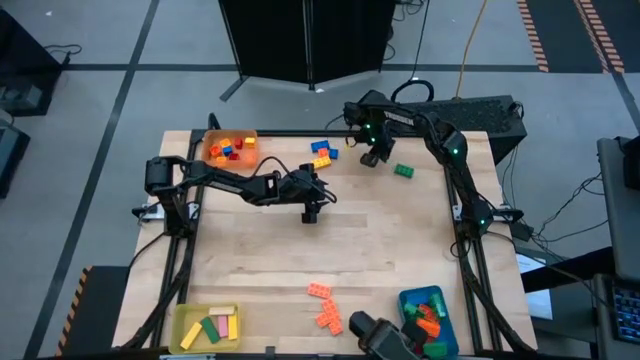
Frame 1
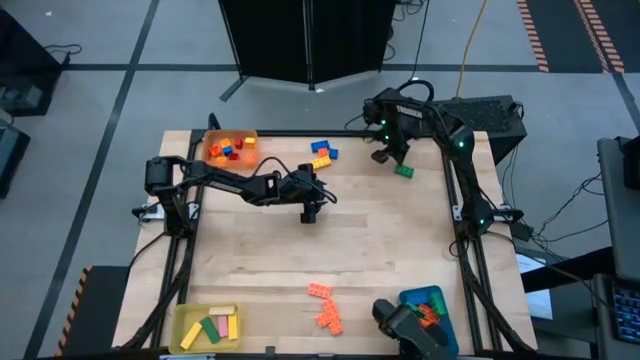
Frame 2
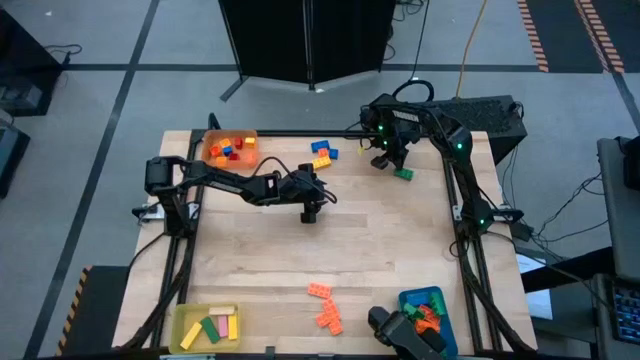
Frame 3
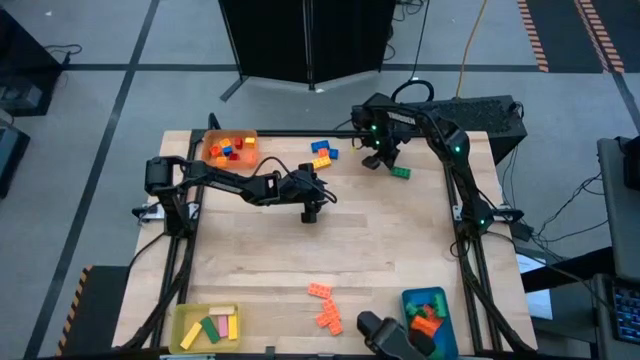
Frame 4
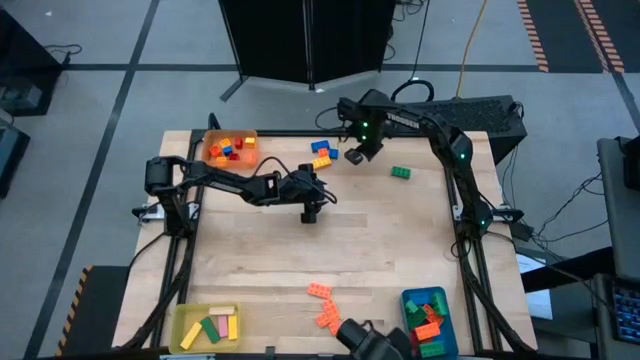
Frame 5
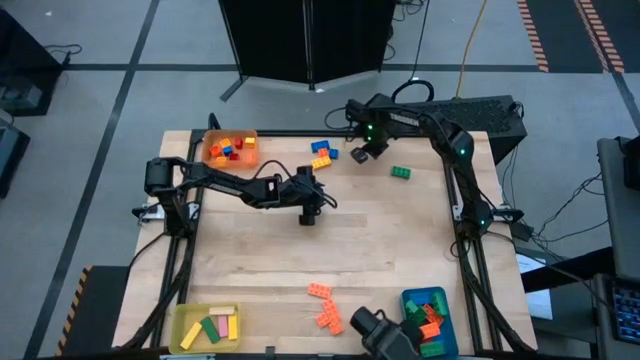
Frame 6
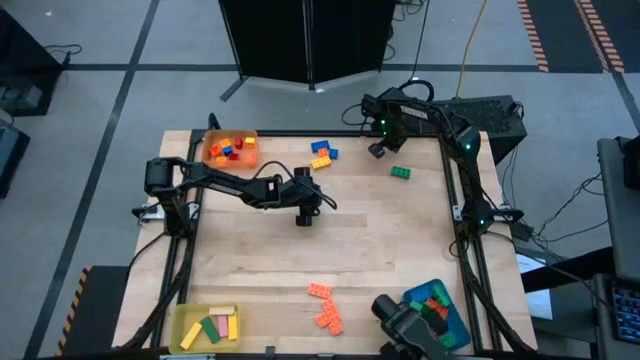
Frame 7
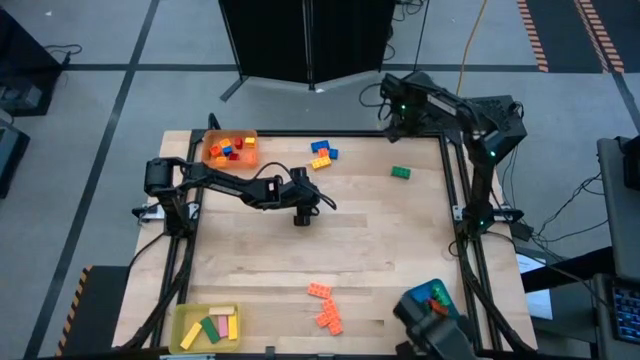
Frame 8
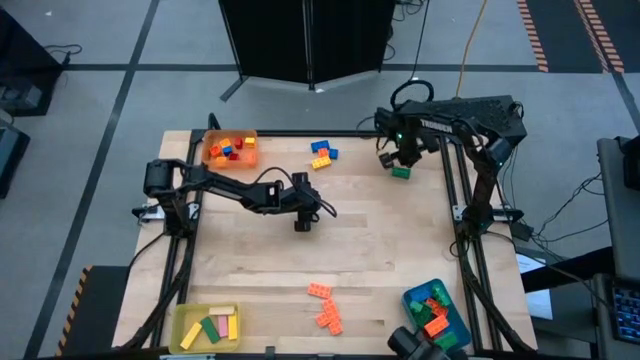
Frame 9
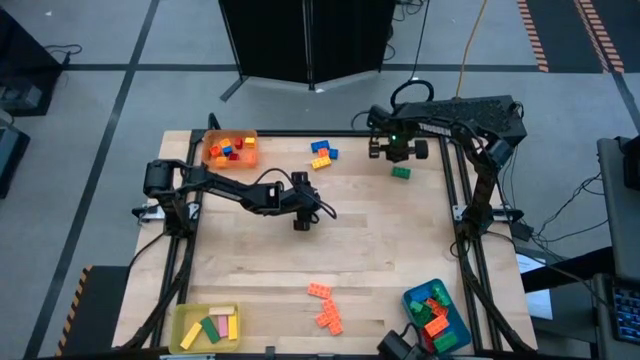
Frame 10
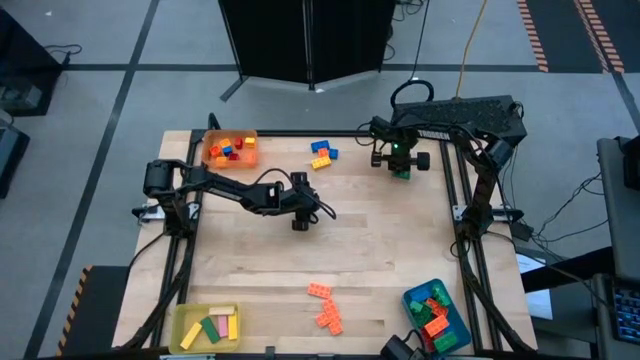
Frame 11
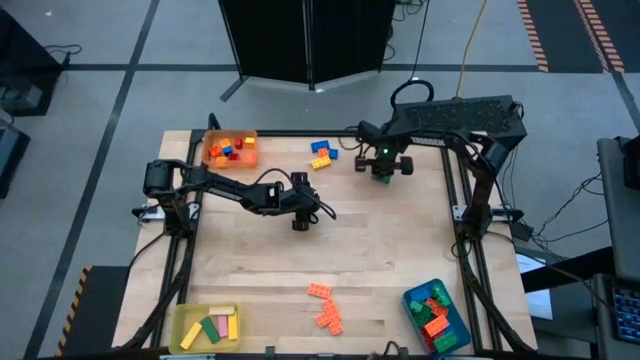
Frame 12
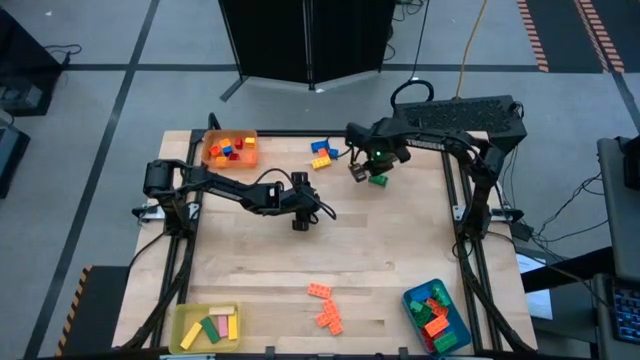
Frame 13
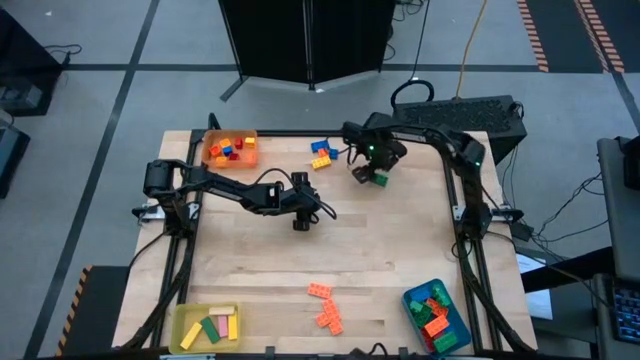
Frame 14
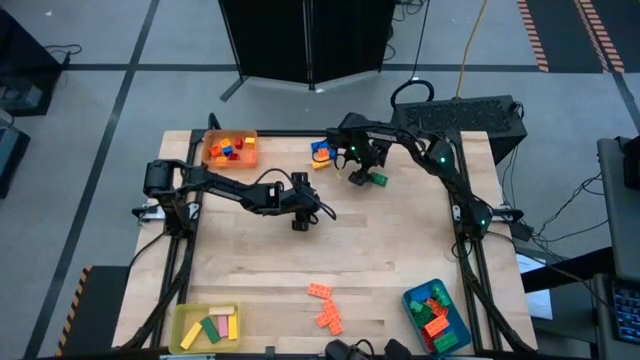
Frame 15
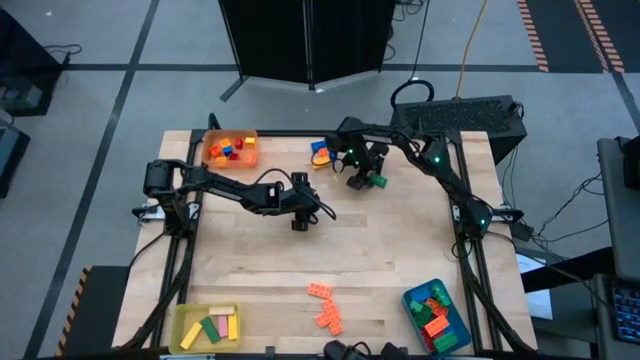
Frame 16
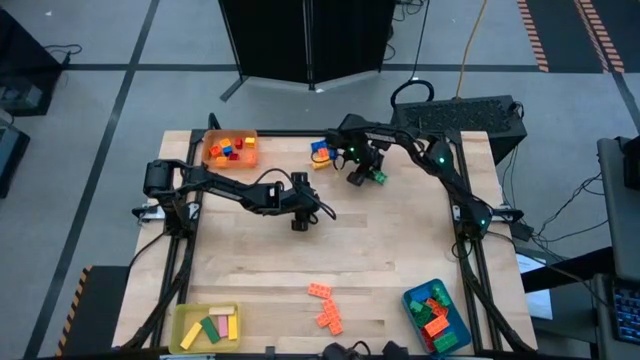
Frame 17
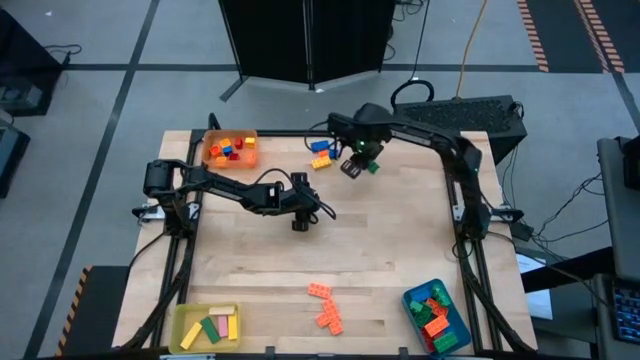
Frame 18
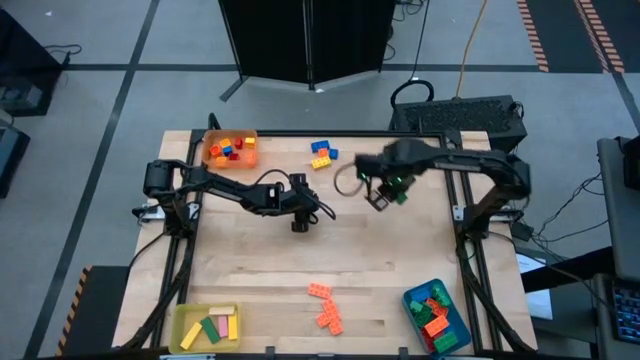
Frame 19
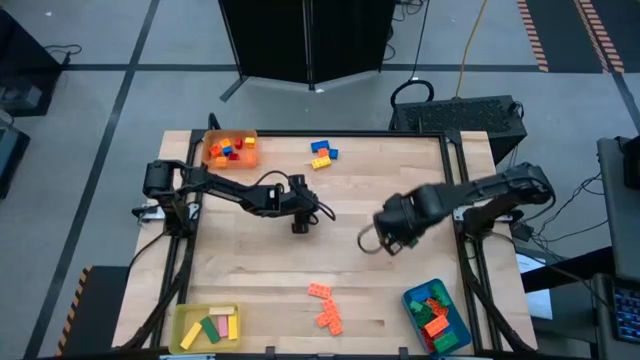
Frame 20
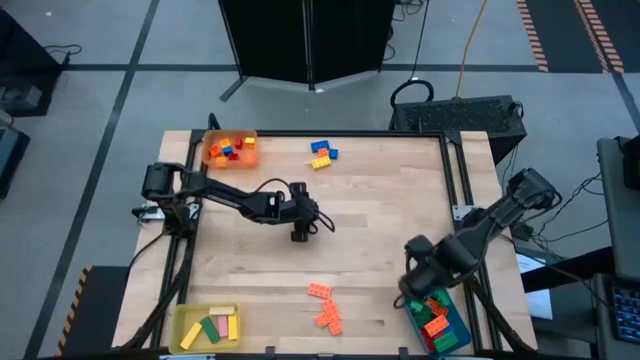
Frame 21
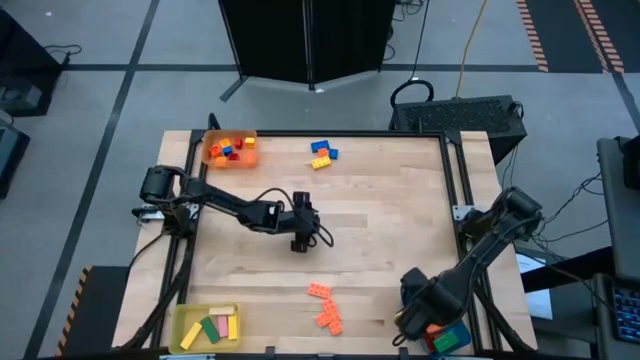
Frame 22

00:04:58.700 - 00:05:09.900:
Task: Sort blocks by size
Put the green 8 stud game piece into the blue bin

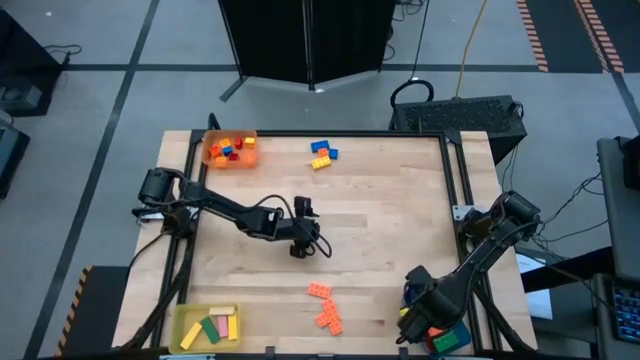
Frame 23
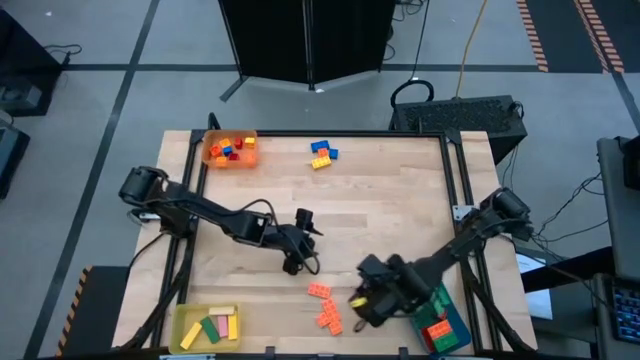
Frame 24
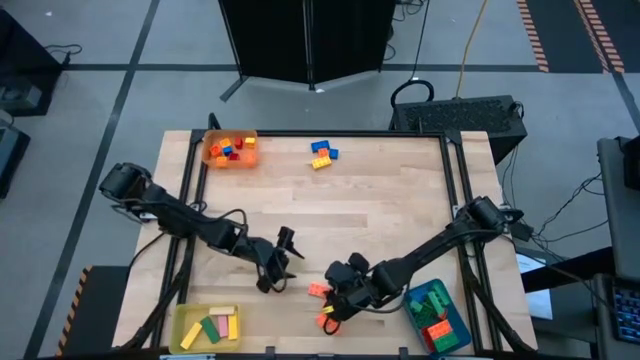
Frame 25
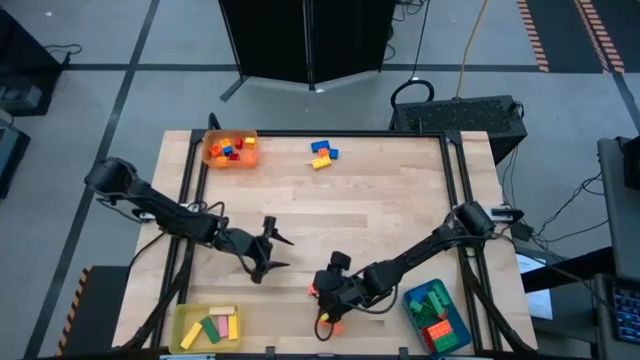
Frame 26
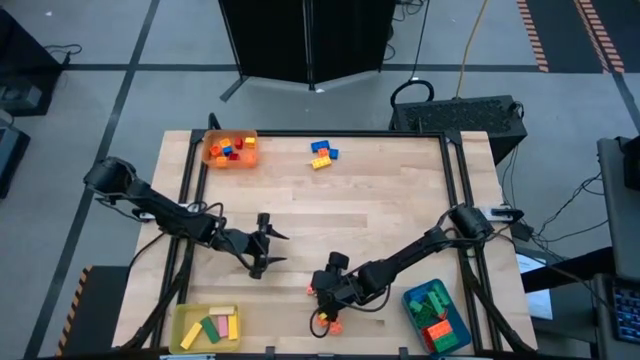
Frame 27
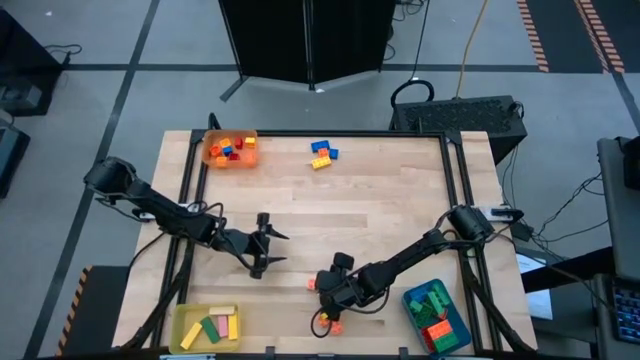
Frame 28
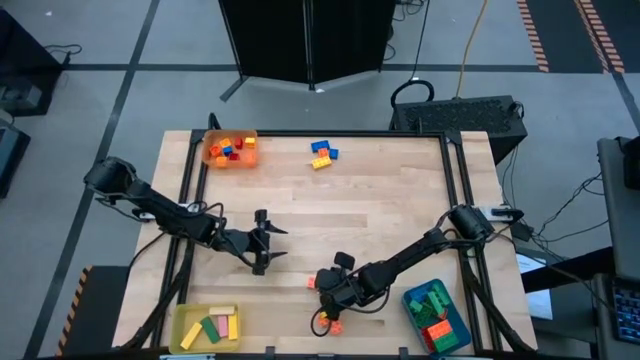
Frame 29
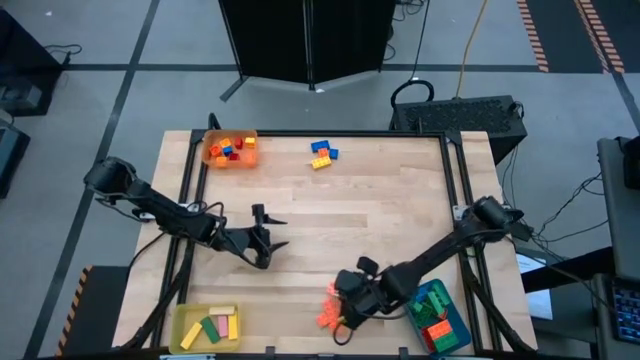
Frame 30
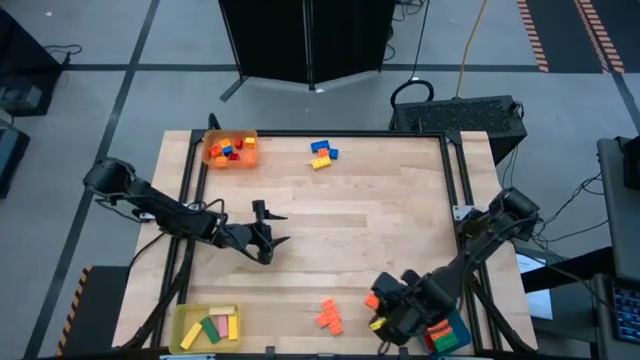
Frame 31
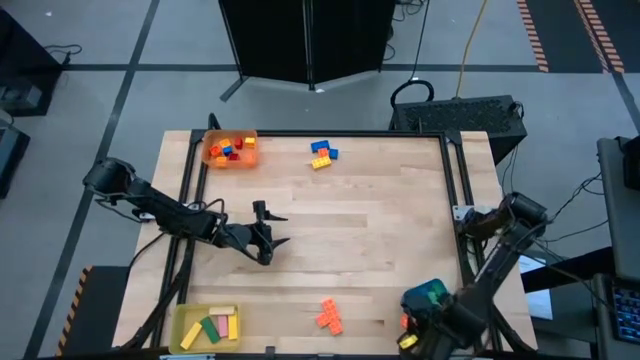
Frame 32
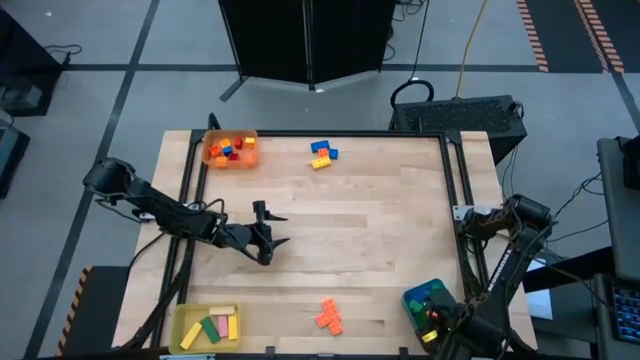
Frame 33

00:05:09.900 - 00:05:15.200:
Put the orange 8 stud game piece into the blue bin

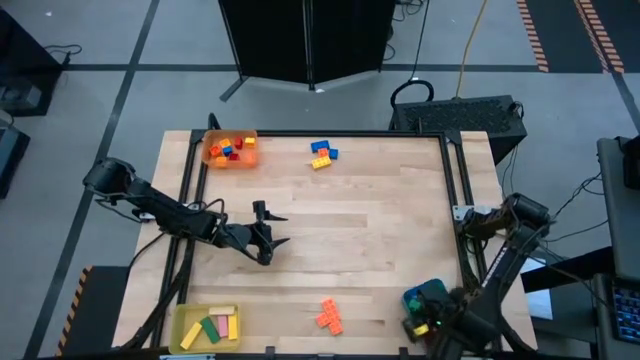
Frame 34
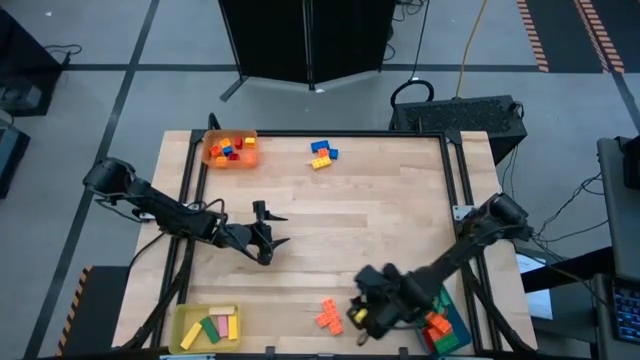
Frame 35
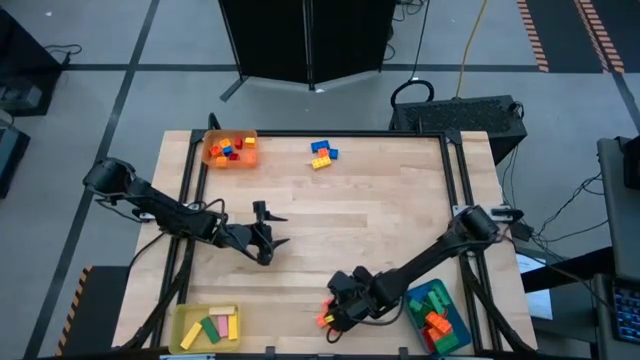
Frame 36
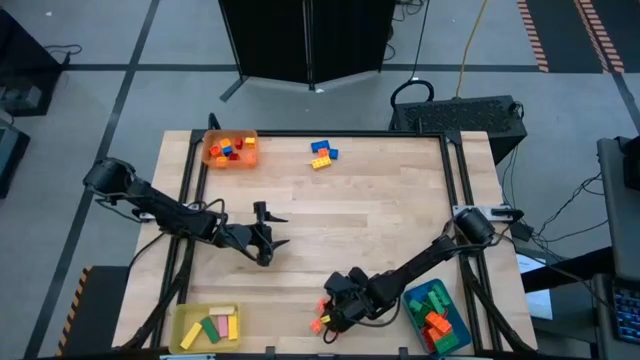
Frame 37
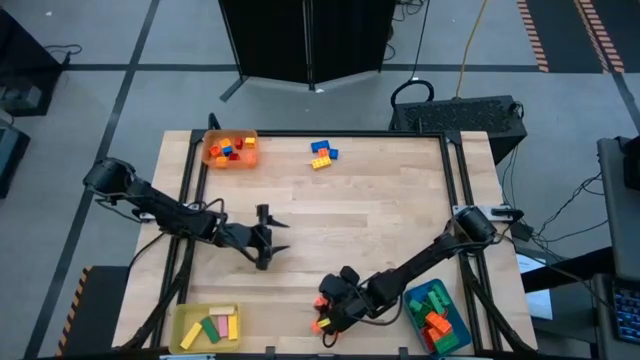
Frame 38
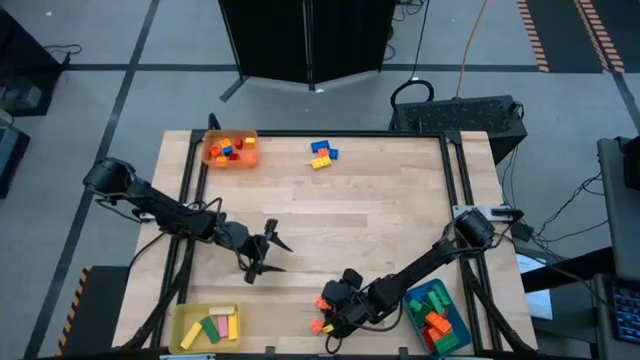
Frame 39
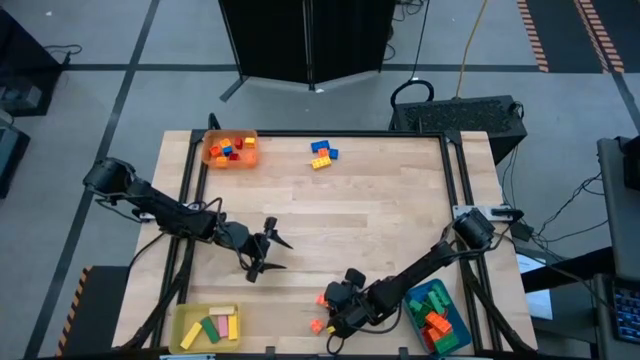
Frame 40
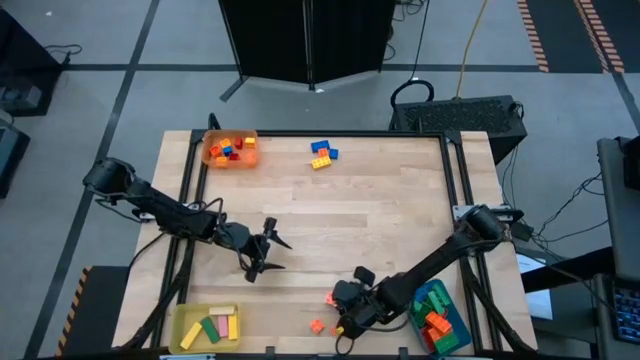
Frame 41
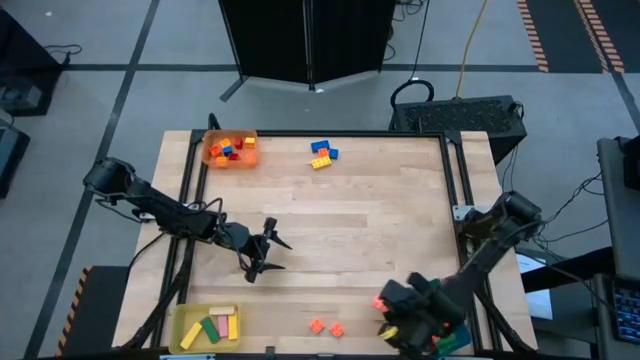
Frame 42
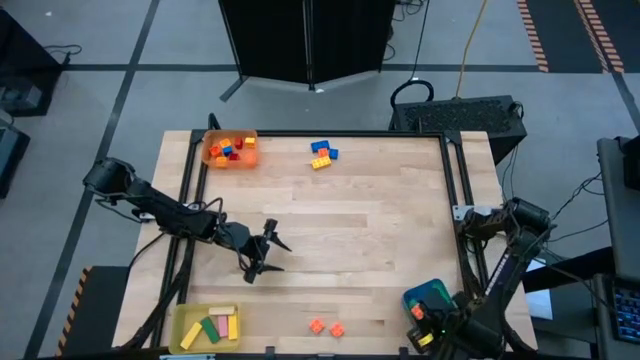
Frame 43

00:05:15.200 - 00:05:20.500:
Put the orange 8 stud game piece into the blue bin
